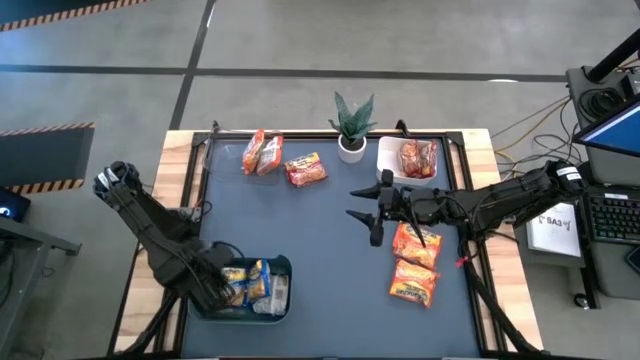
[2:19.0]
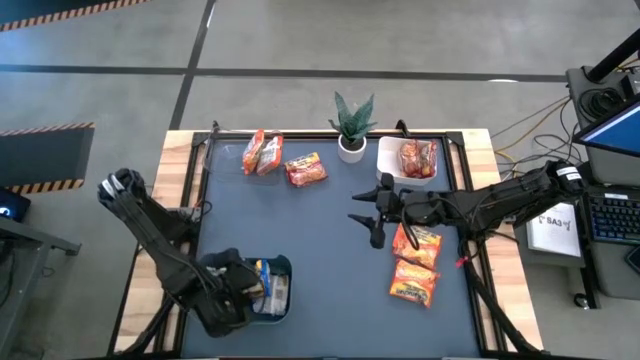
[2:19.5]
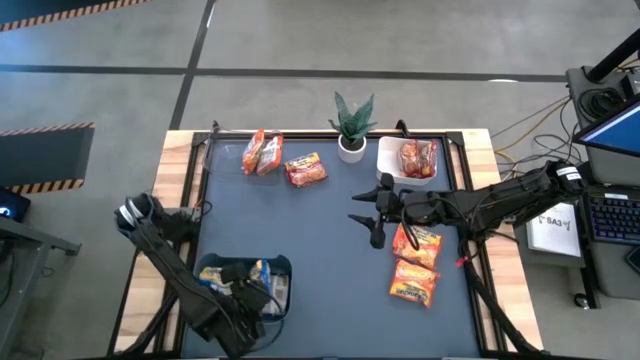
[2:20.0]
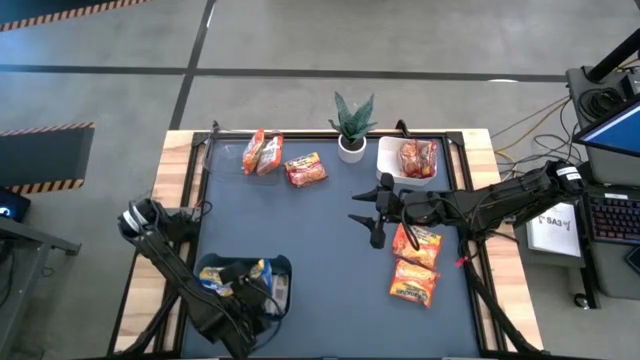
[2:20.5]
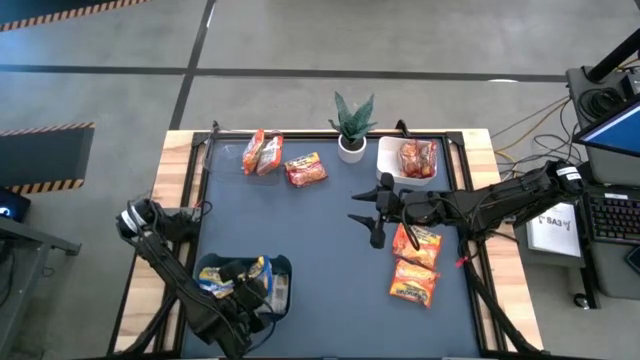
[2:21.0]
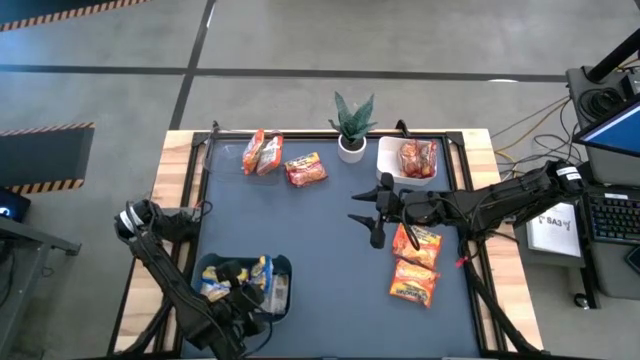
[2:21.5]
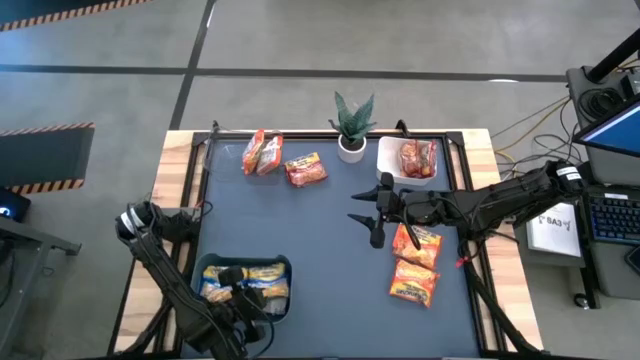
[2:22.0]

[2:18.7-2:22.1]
Task: Sort Maruchan noodles
Adjust the blue noodle pack in the blue bin

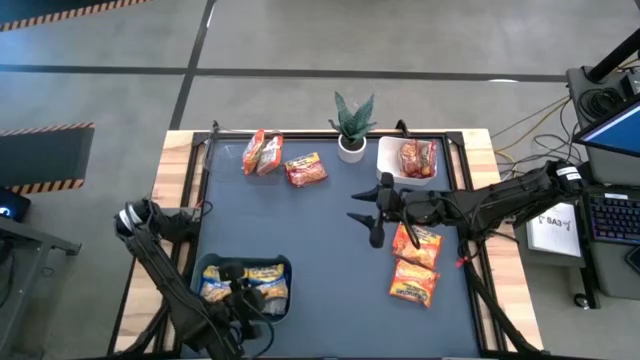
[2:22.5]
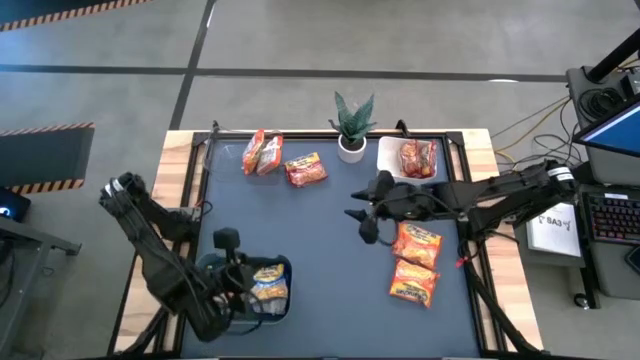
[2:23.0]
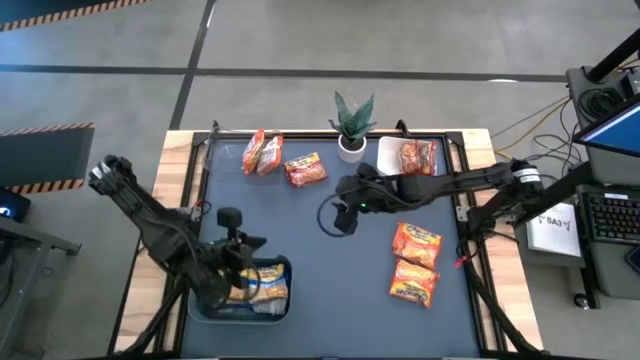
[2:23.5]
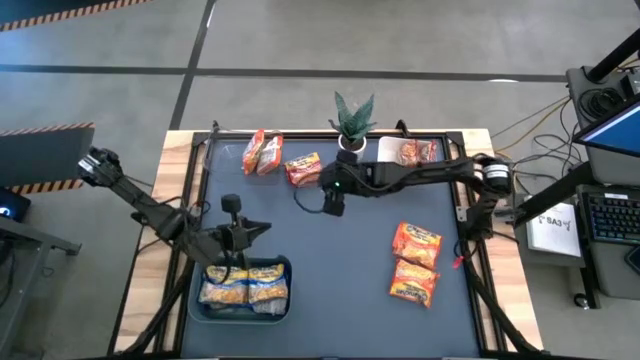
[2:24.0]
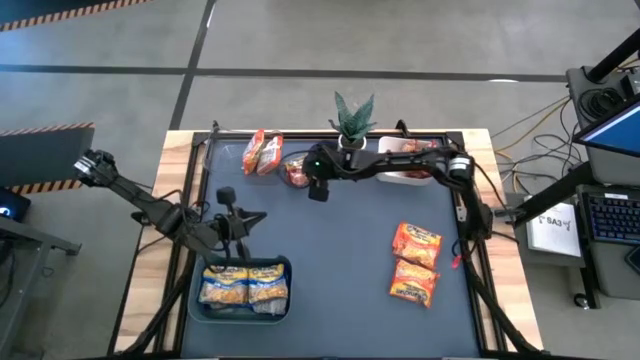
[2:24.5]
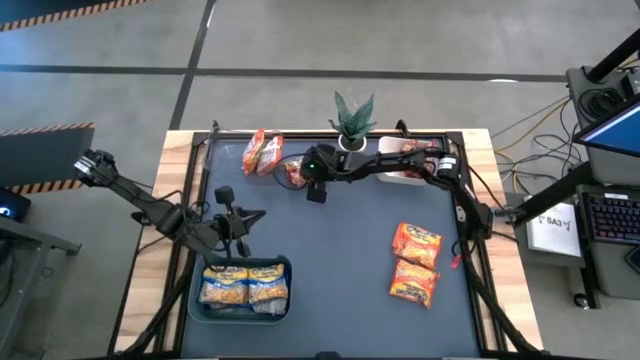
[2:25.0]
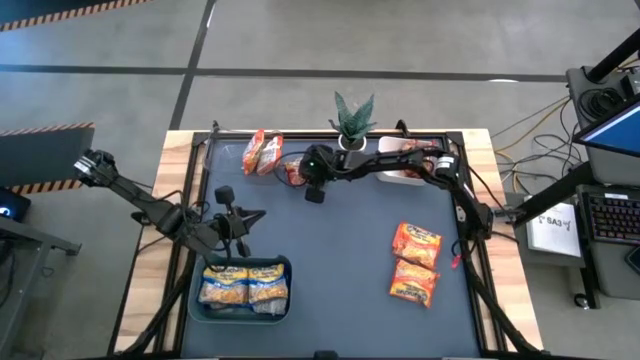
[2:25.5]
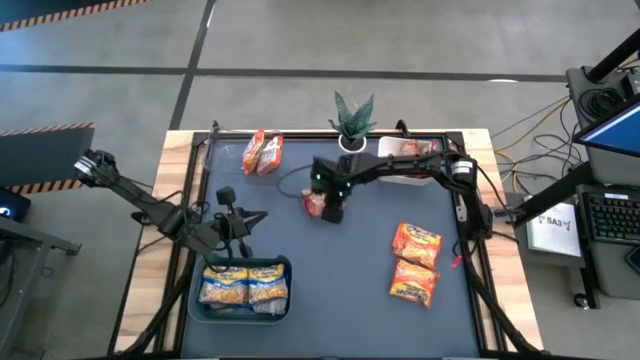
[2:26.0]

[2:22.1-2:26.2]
Put the red noodle pack into the white bin

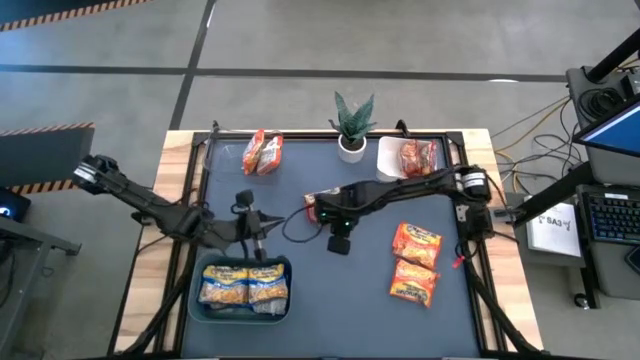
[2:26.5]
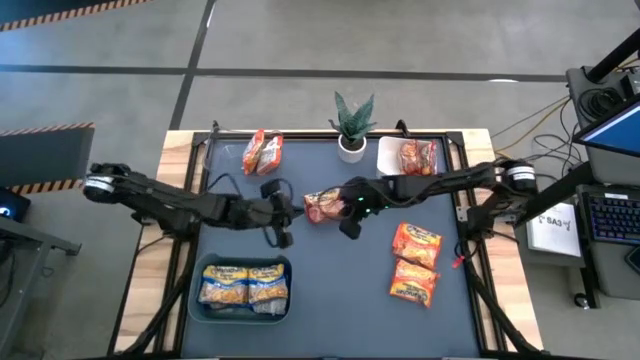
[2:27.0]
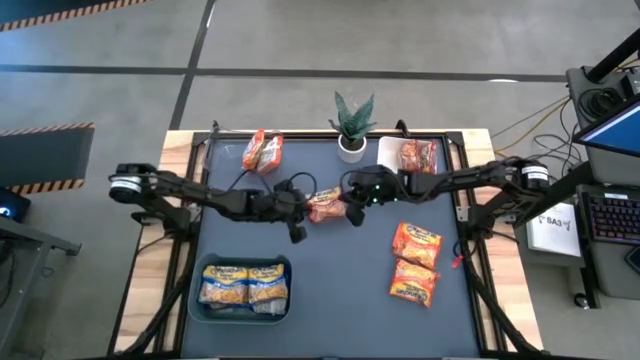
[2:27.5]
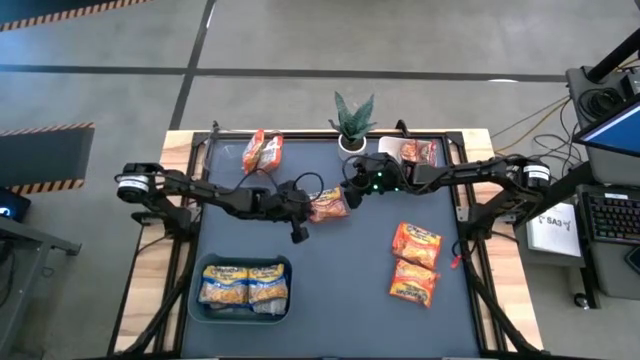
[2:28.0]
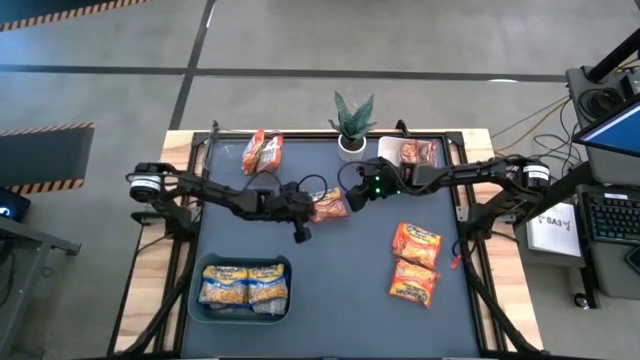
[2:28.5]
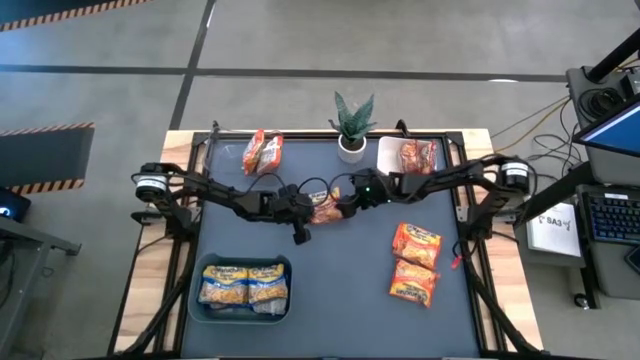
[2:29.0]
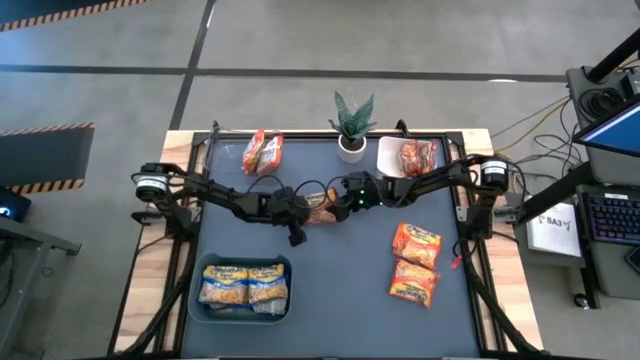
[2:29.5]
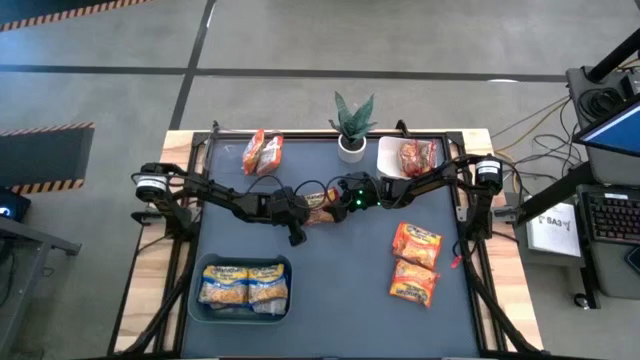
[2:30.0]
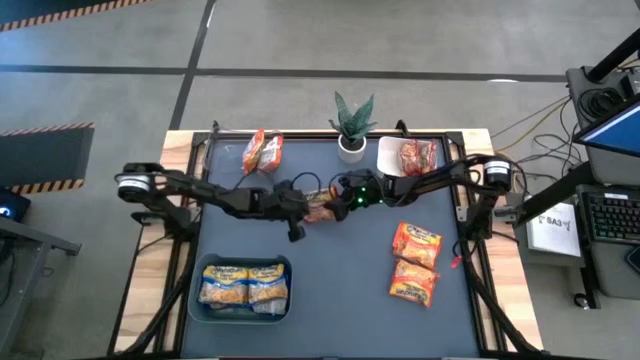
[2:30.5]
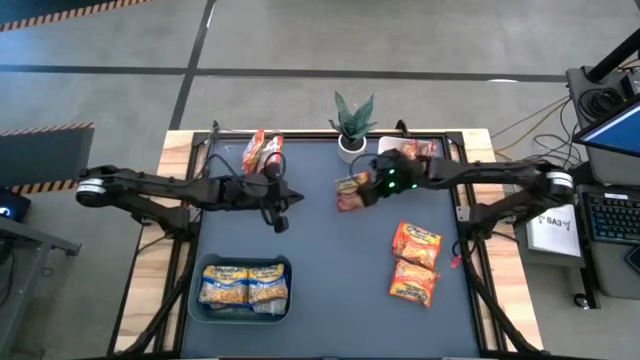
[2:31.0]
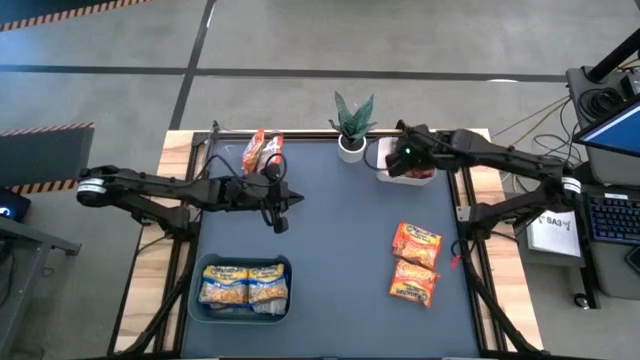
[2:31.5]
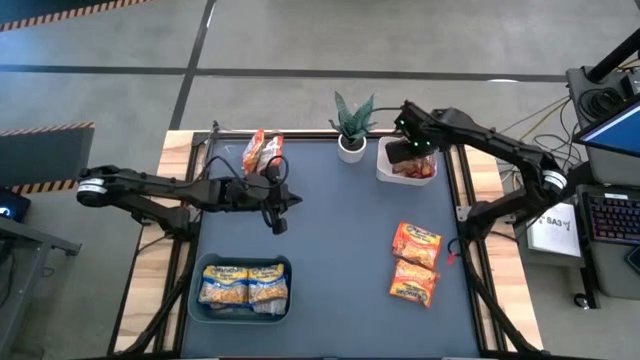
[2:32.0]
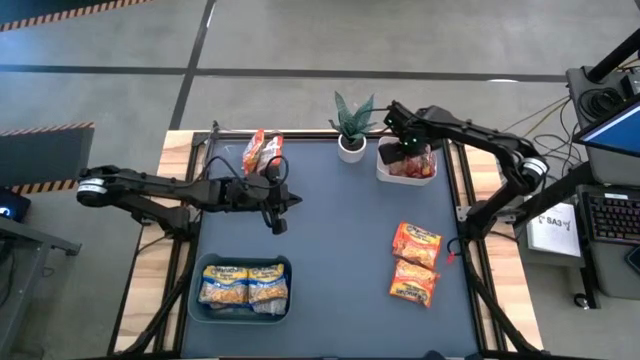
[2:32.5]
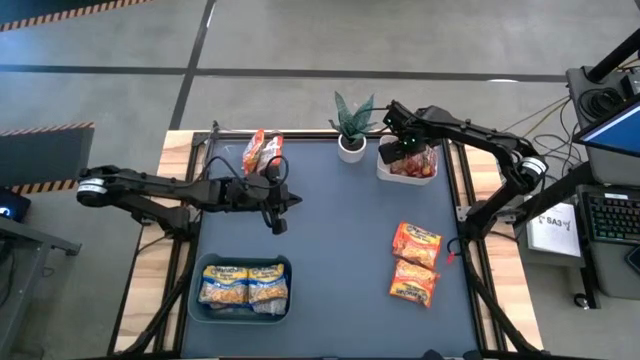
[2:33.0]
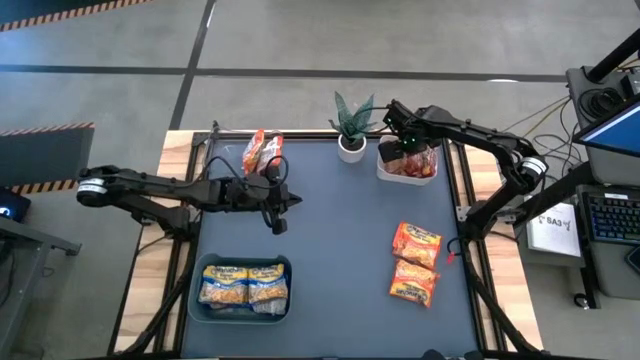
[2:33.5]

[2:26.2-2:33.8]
Put the red noodle pack into the white bin

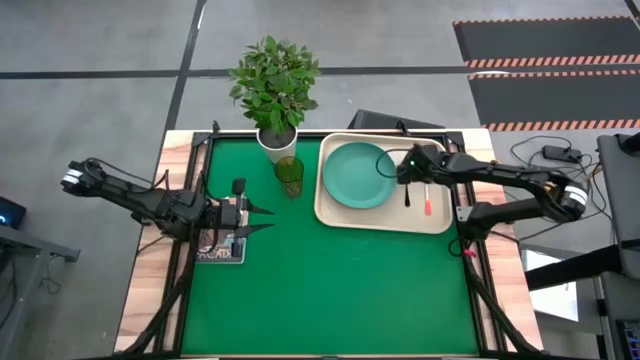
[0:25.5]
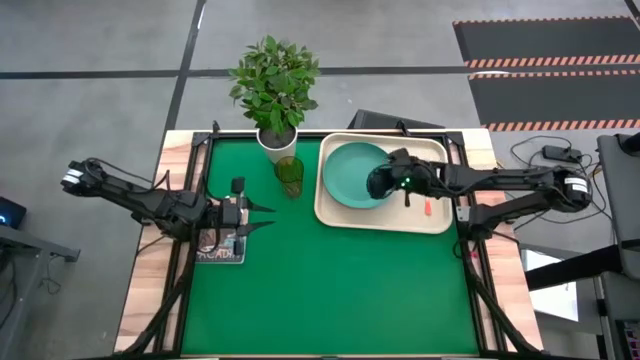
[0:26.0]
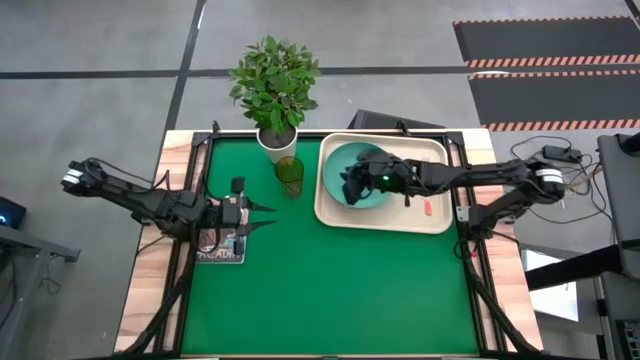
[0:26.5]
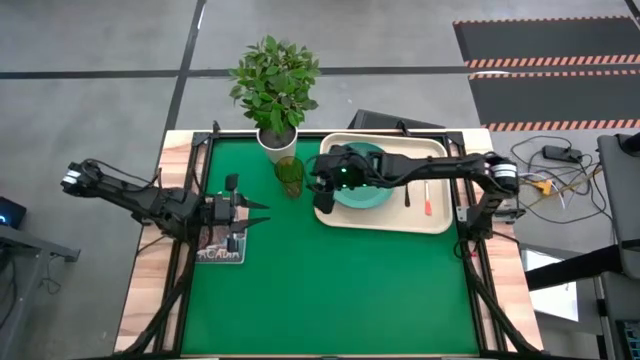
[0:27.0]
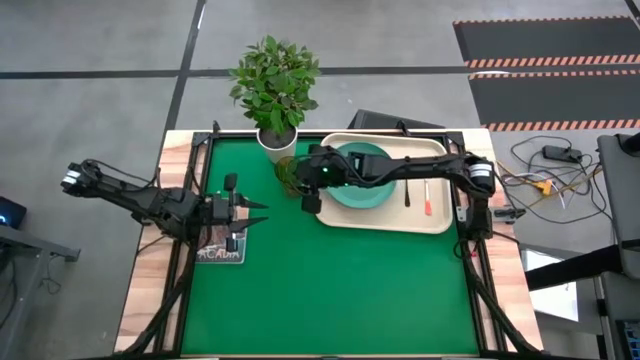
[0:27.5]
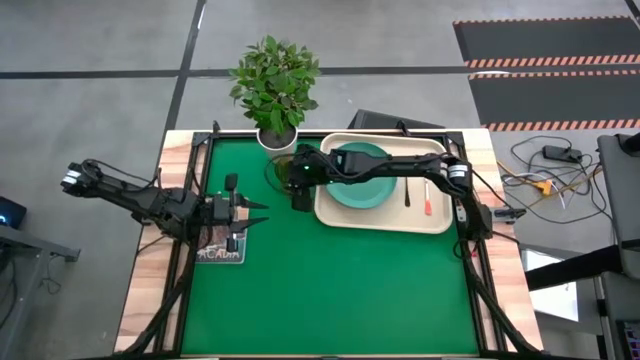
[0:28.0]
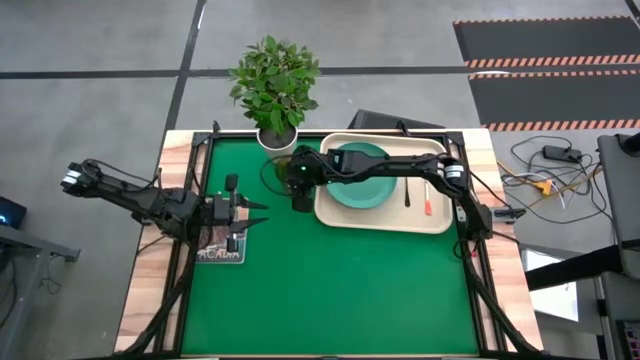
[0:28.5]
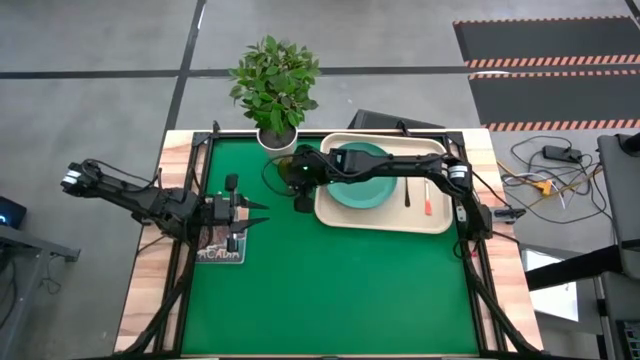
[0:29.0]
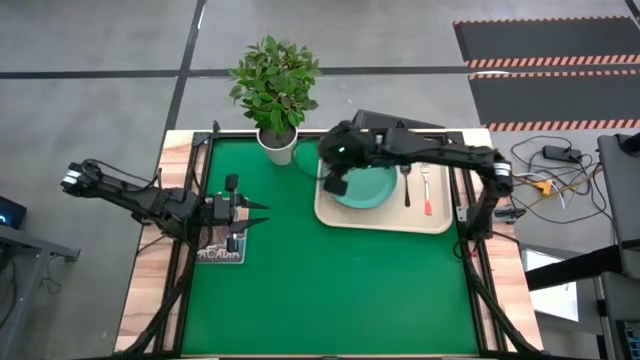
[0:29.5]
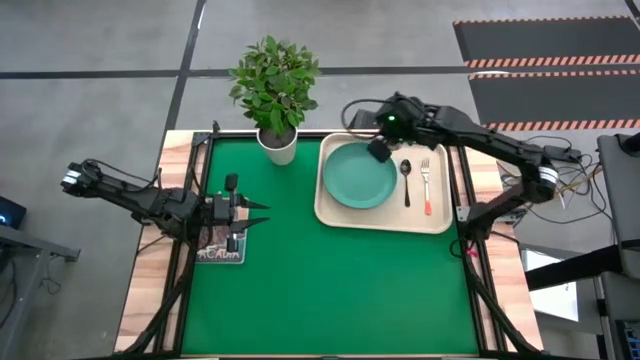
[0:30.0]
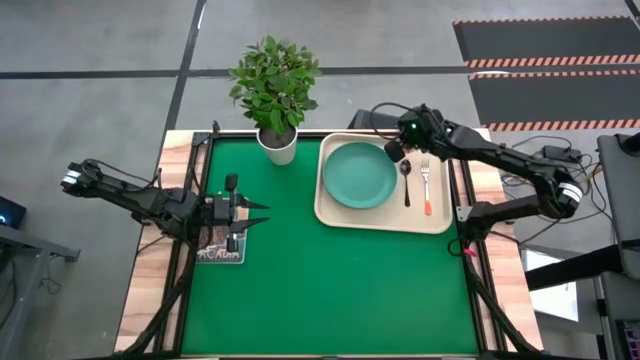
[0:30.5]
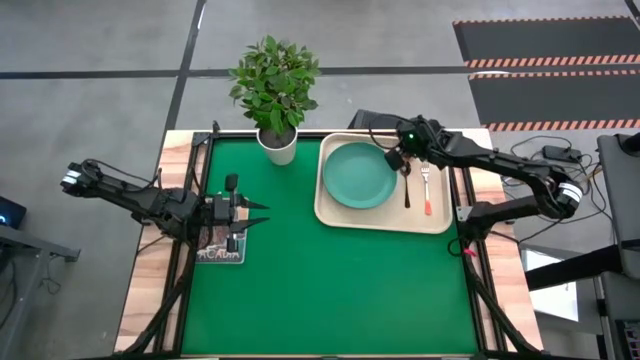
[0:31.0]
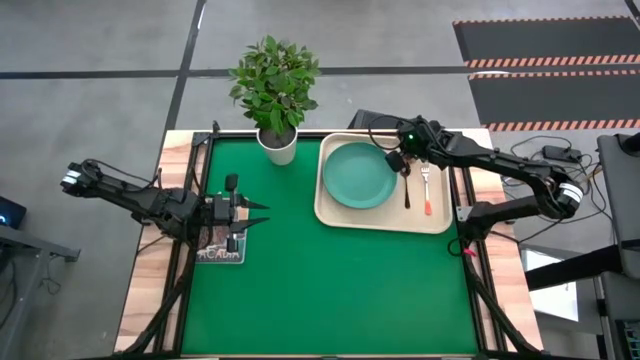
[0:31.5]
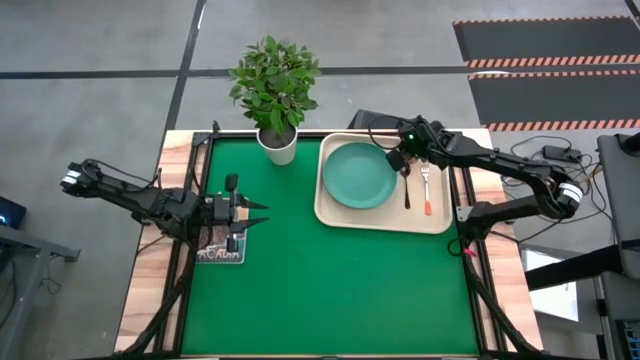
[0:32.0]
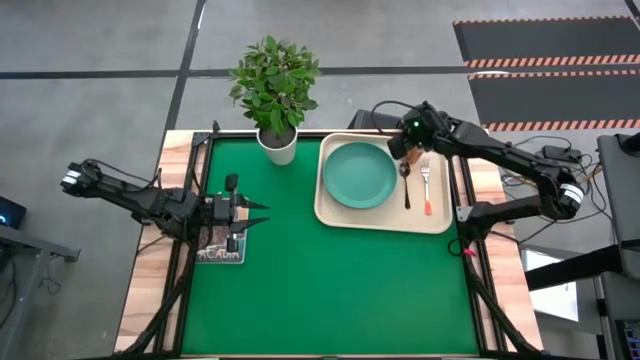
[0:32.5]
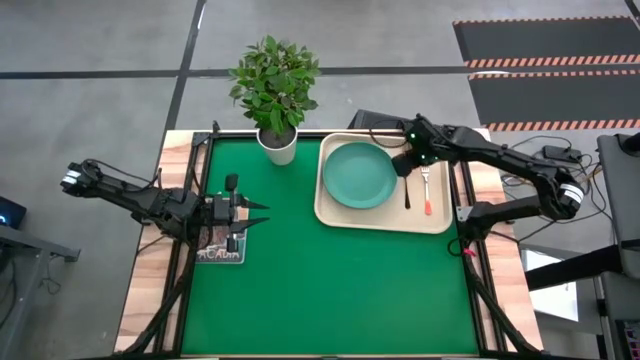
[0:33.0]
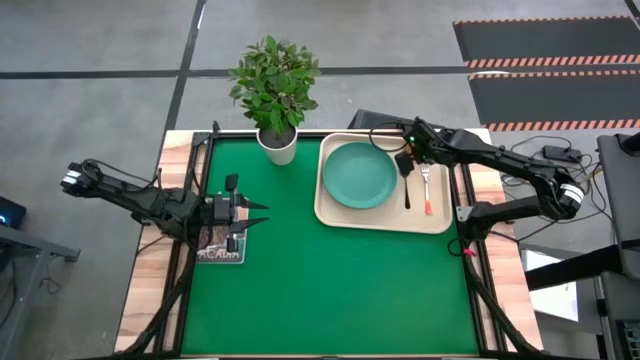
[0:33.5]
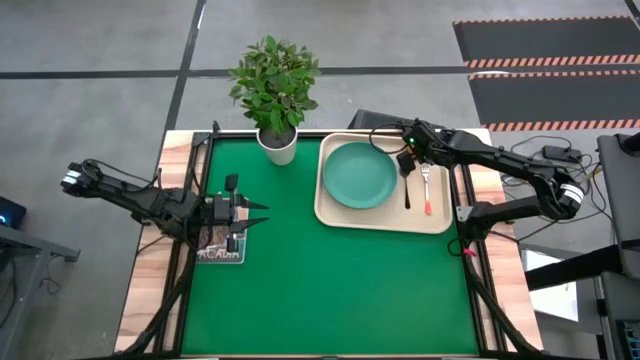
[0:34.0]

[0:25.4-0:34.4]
Task: Pick and place plate/cup/fork/spoon on tray
Put the brown cup on top of the green plate on the white tray
